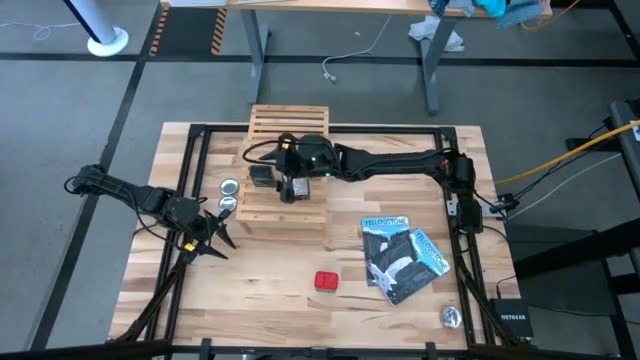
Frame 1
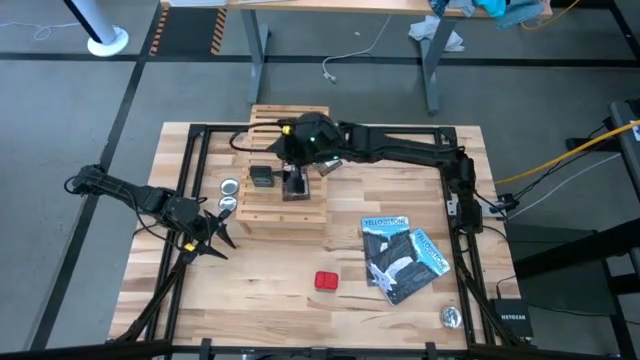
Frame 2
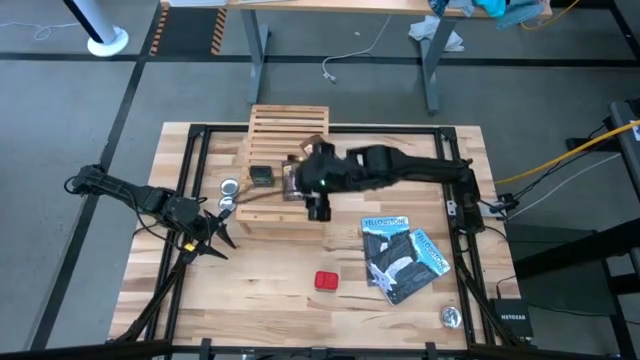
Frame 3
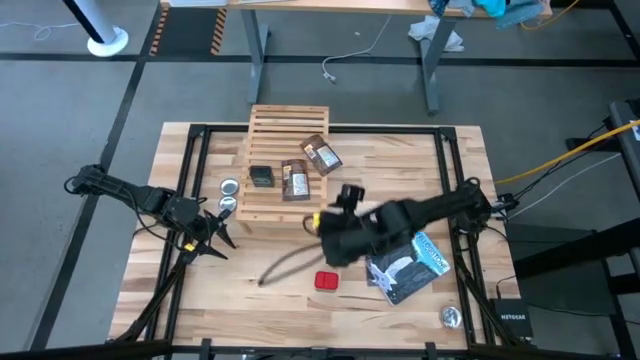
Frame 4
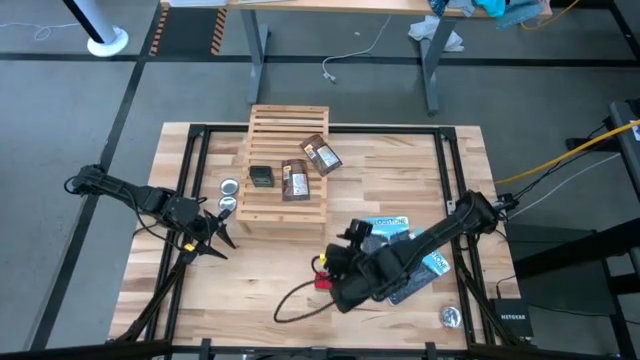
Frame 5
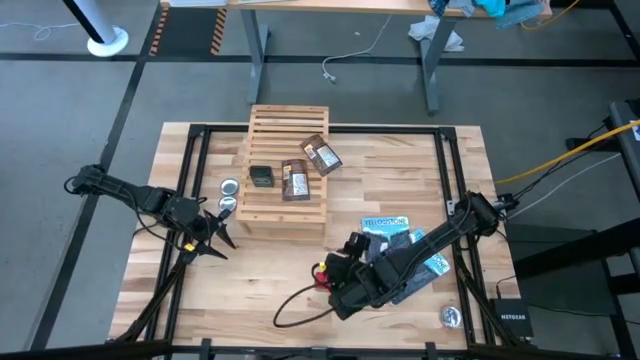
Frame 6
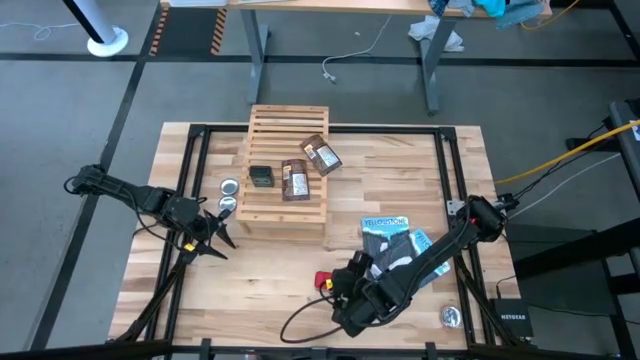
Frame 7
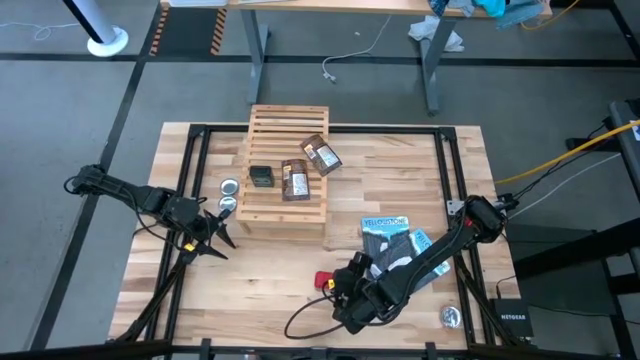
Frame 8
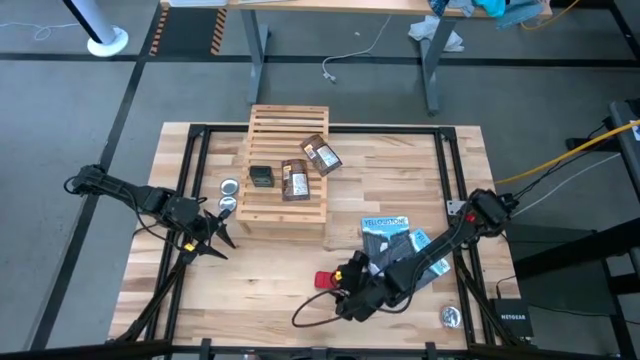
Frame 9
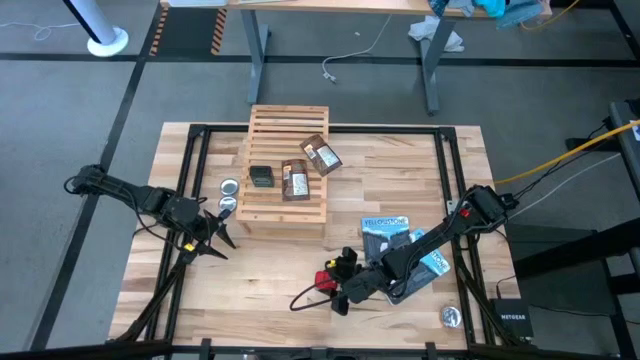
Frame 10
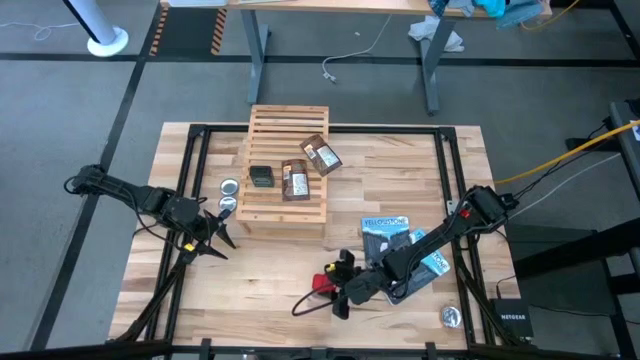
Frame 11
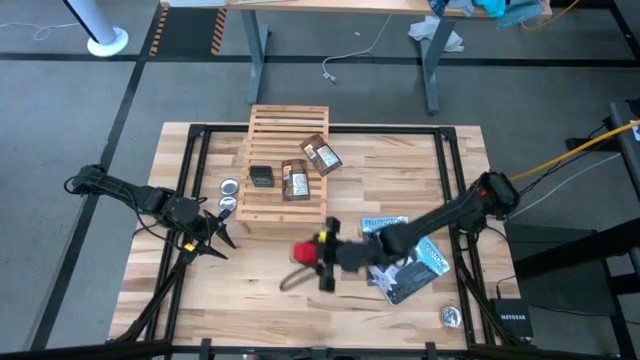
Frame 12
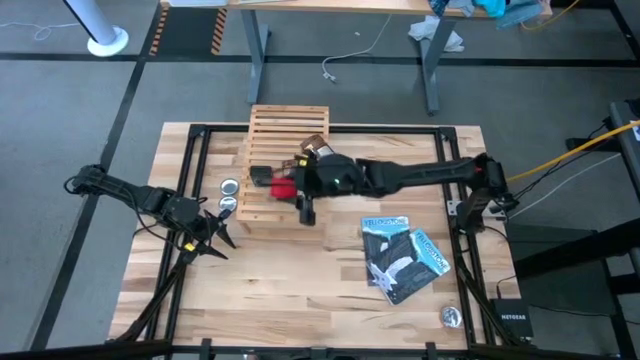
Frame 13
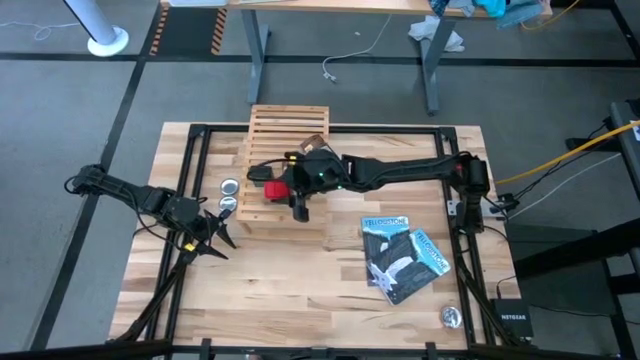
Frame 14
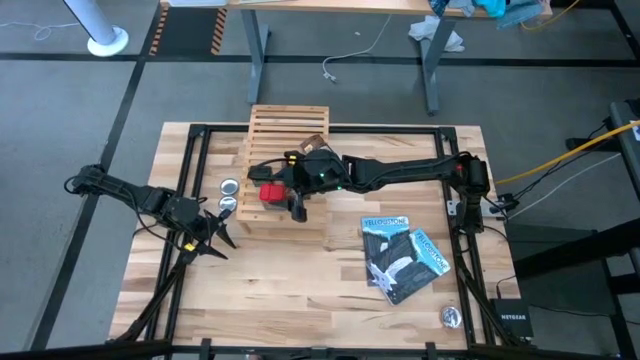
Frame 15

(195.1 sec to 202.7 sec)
Task: Shelf spices
Put the red seasoning can on the shelf

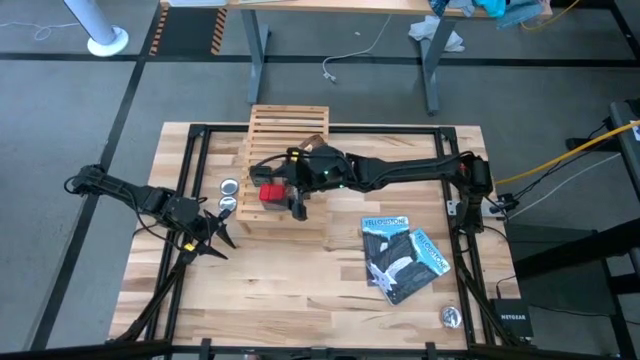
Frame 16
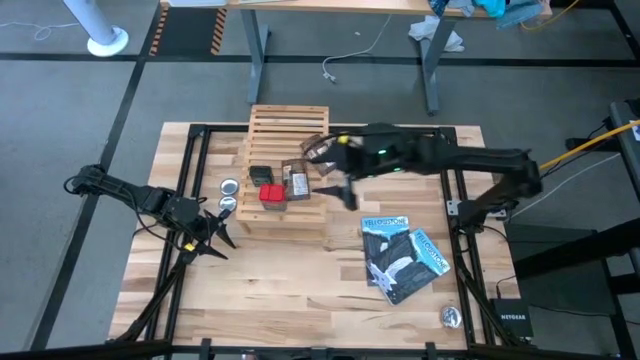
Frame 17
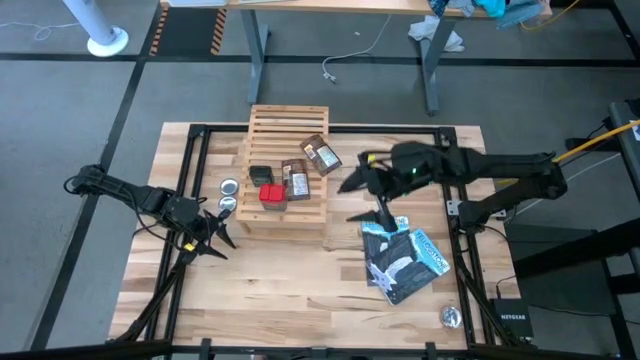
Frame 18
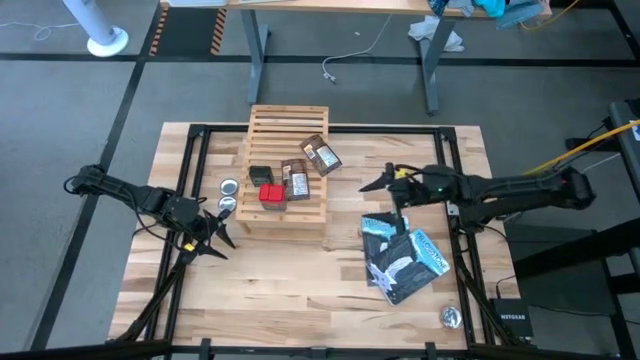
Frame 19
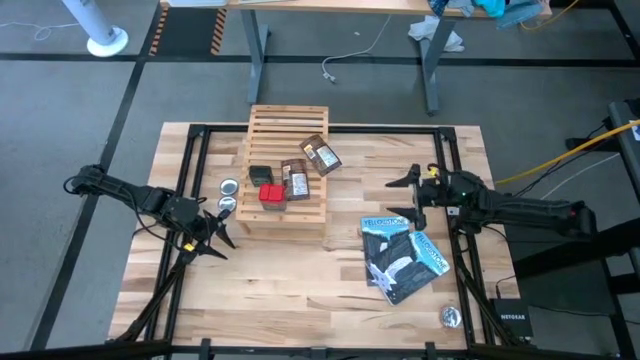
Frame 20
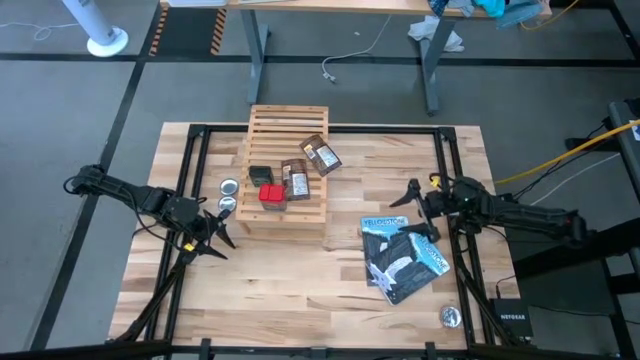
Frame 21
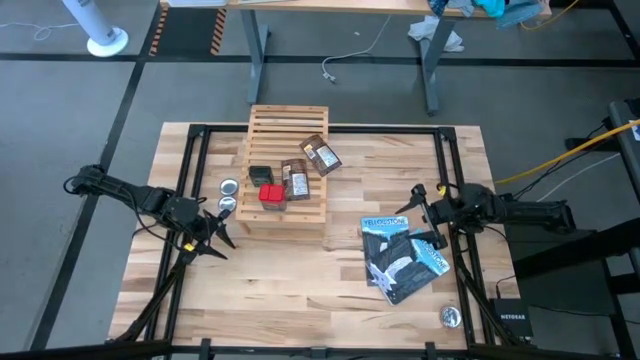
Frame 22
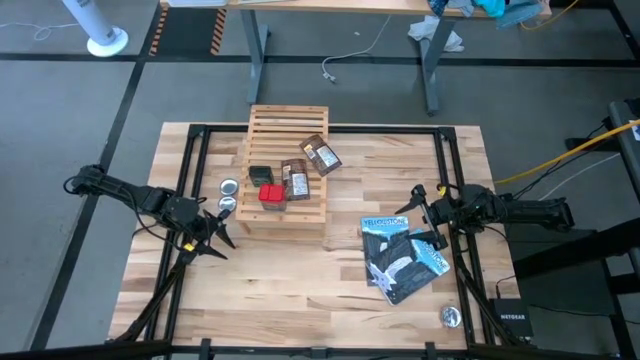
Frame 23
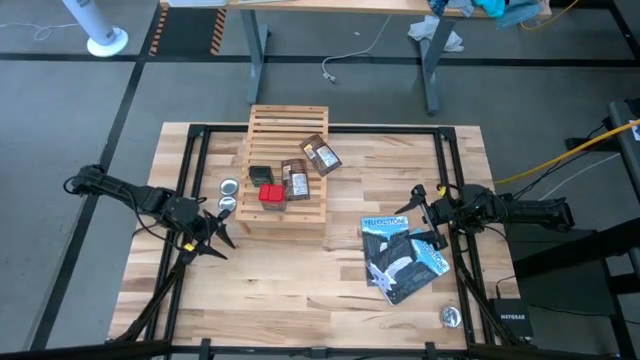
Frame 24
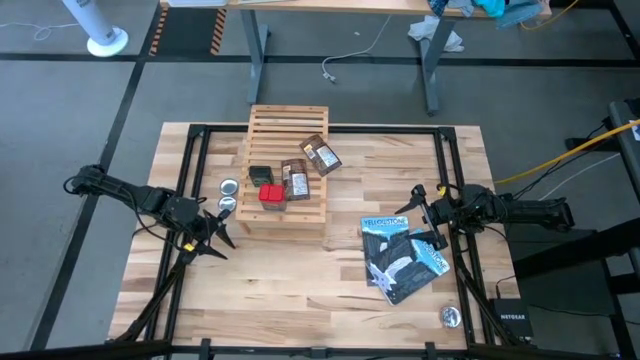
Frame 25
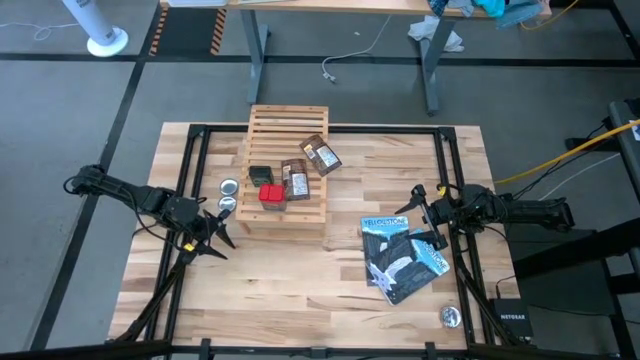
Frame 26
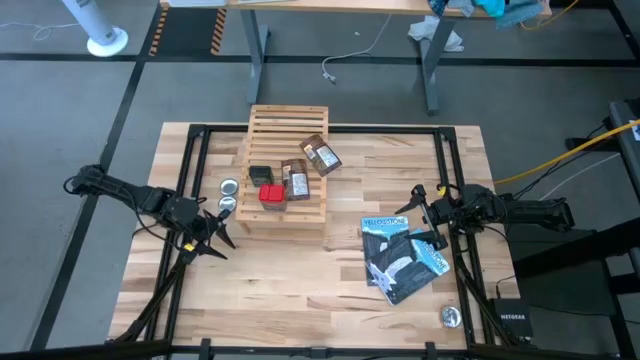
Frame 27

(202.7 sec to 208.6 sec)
Return to Home Position

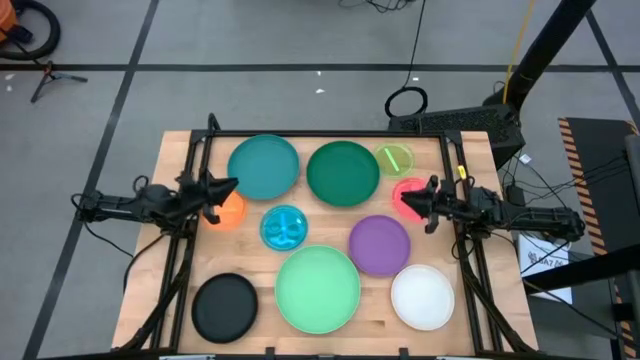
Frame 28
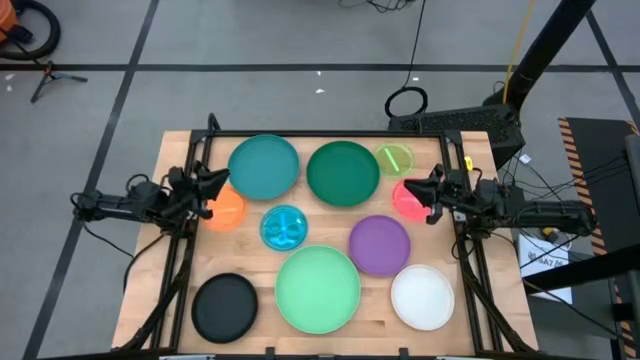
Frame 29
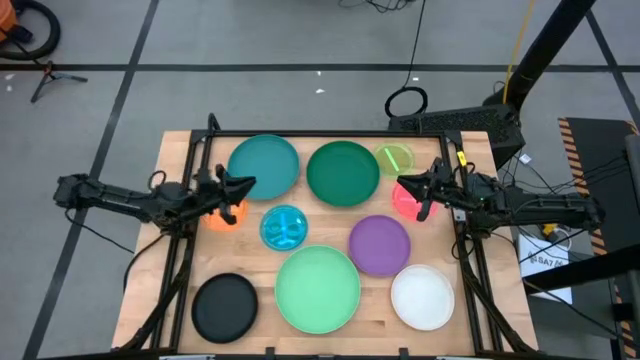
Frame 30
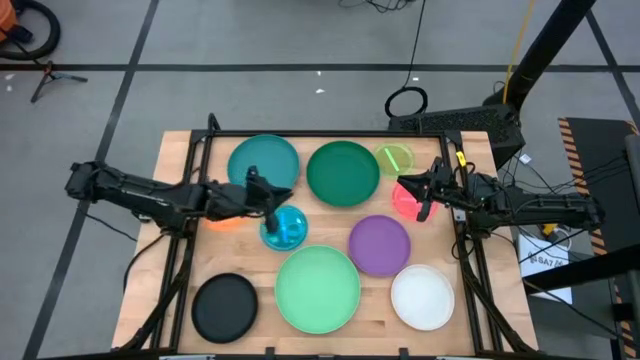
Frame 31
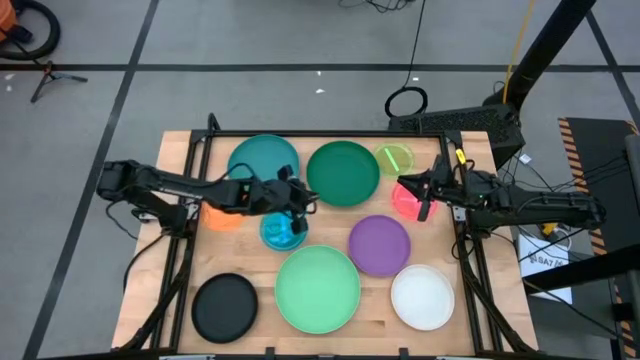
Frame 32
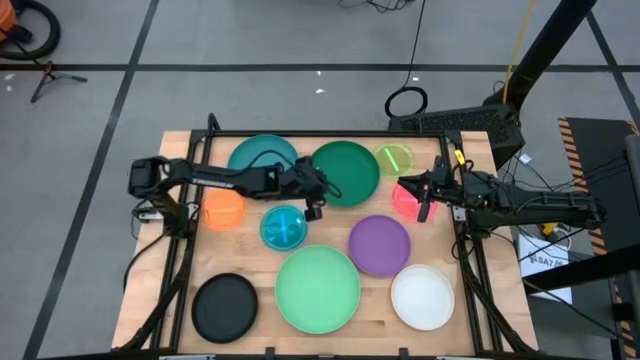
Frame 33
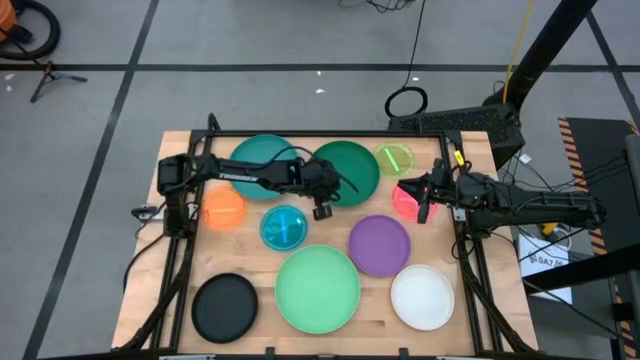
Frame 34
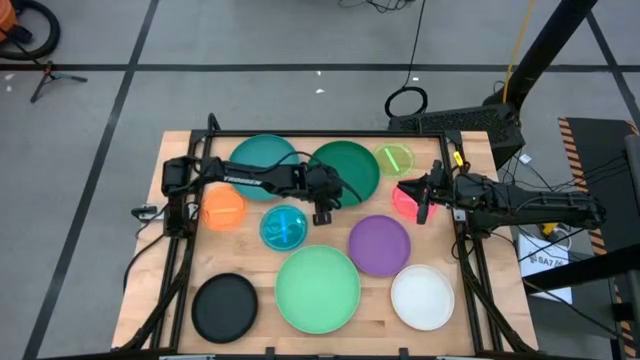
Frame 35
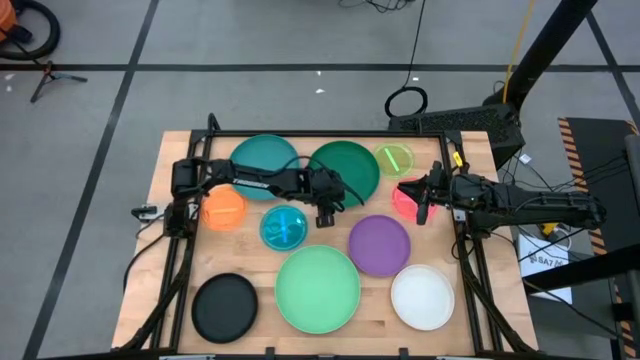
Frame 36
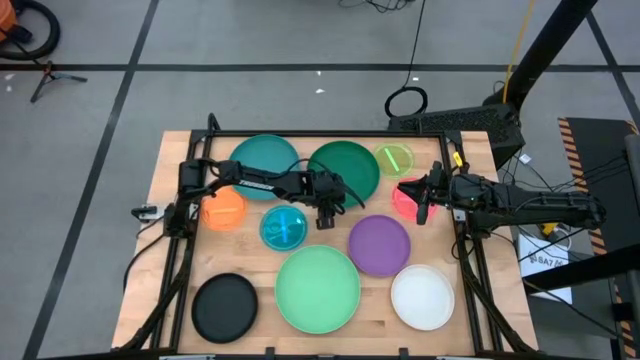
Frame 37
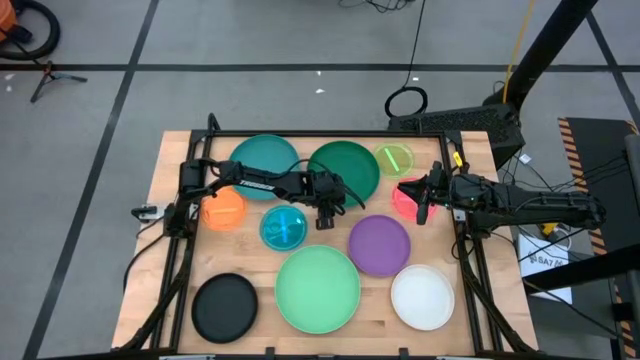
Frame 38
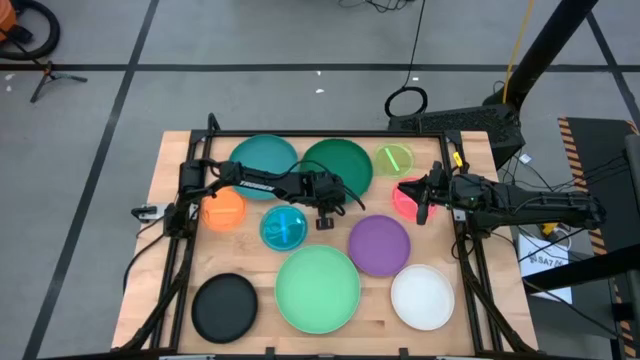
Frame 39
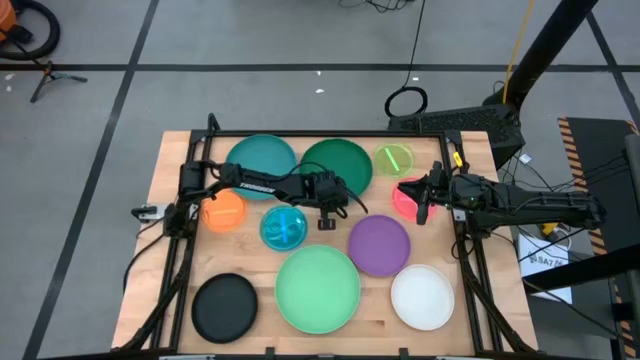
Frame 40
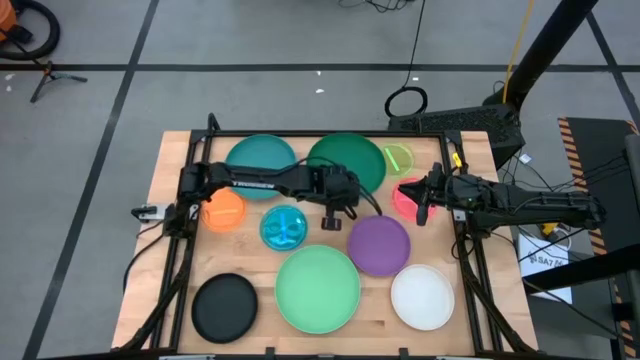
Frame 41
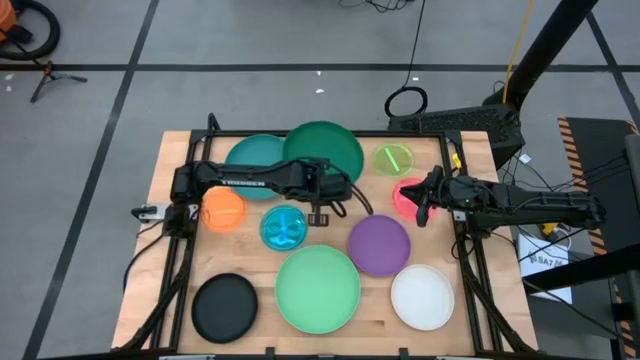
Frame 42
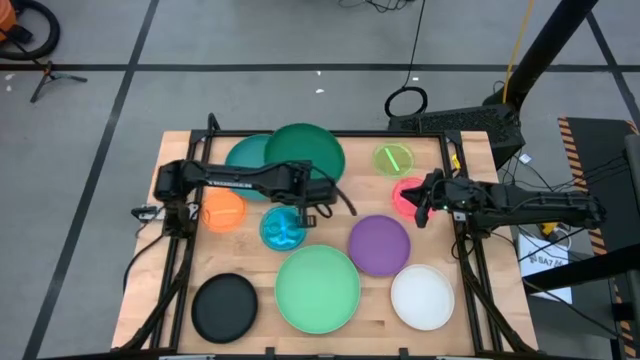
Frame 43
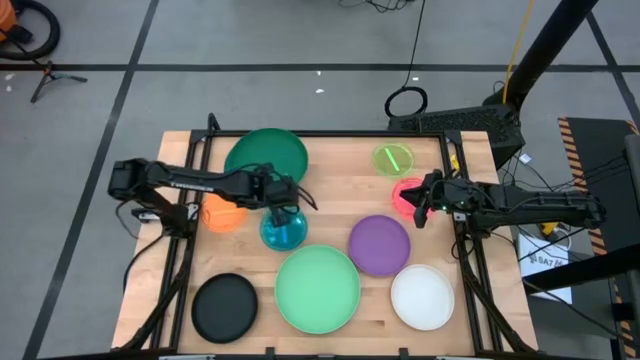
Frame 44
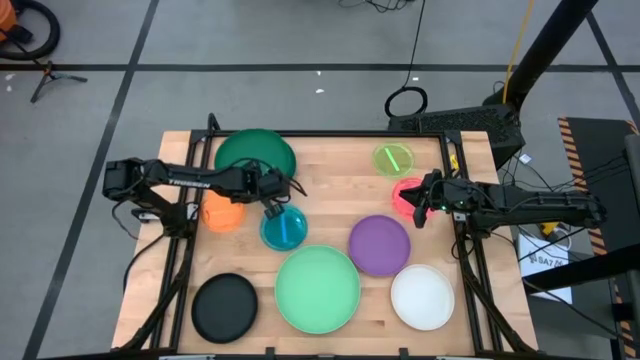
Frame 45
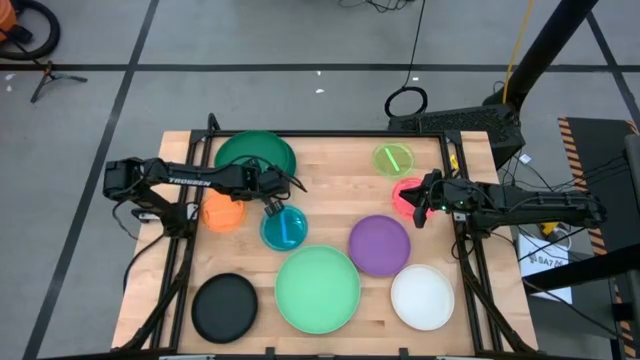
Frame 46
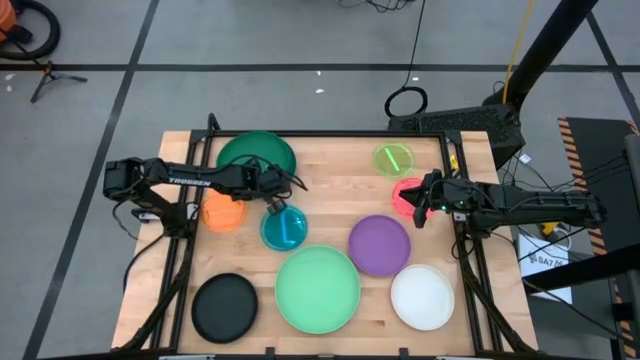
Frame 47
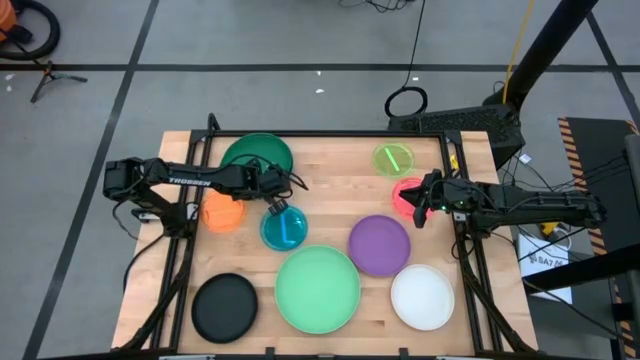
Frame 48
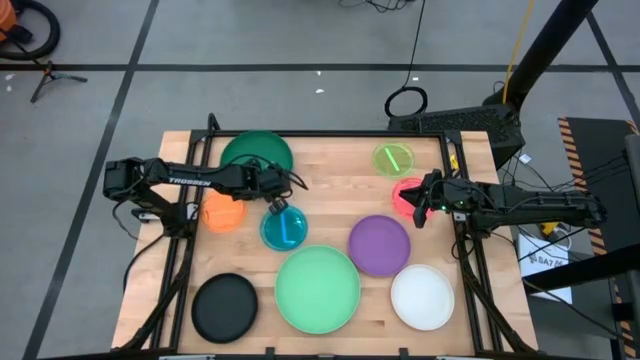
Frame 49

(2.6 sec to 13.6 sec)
Task: Stack plastic plates
Stack the large green plate on top of the large blue plate
